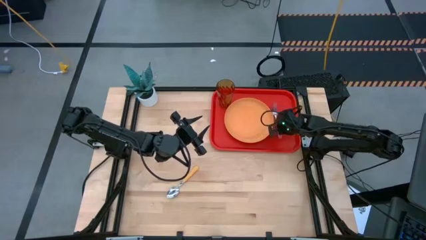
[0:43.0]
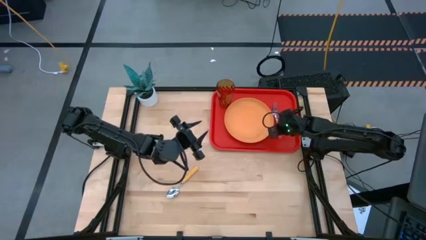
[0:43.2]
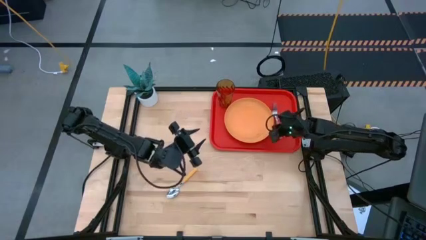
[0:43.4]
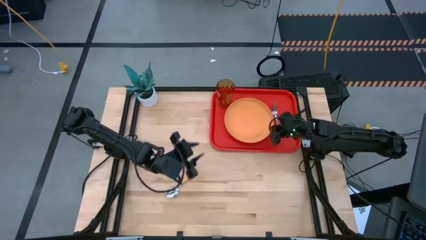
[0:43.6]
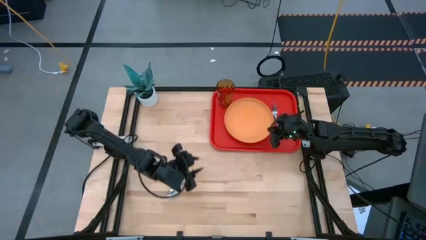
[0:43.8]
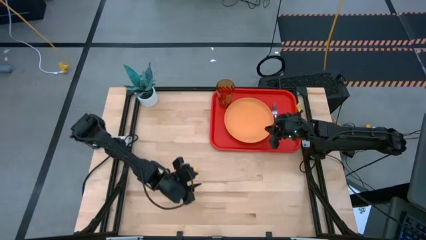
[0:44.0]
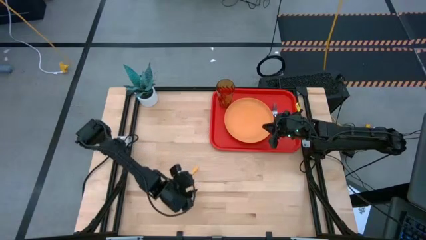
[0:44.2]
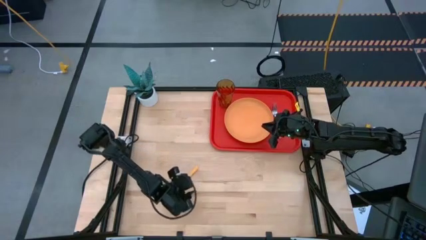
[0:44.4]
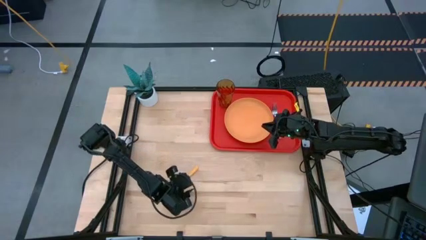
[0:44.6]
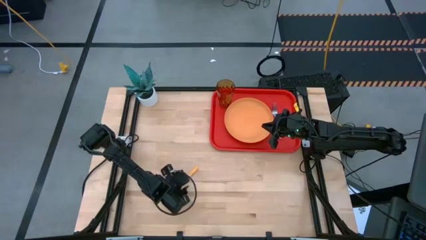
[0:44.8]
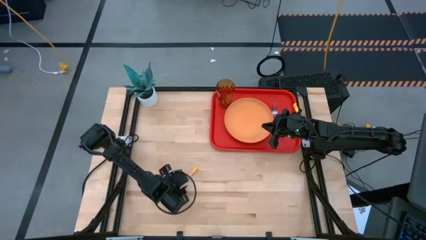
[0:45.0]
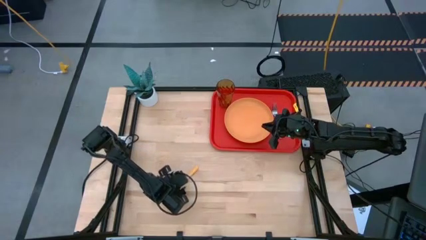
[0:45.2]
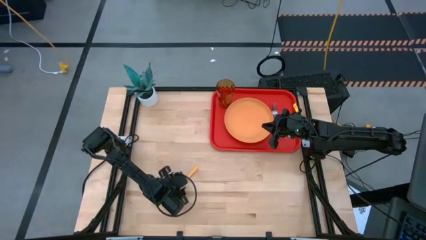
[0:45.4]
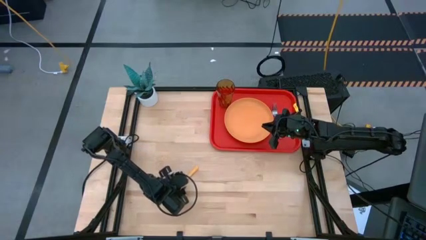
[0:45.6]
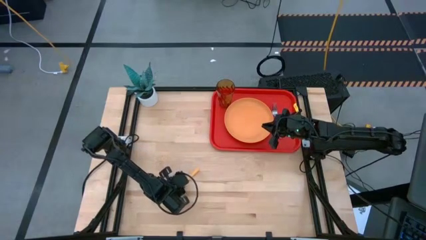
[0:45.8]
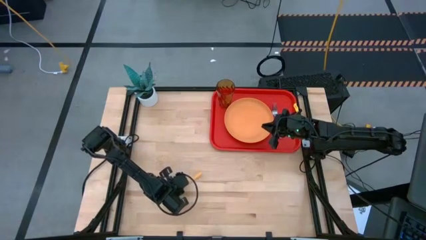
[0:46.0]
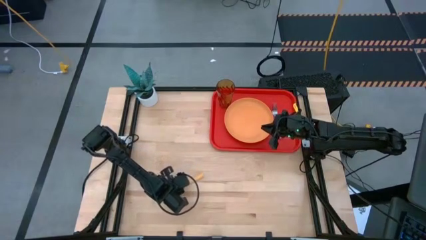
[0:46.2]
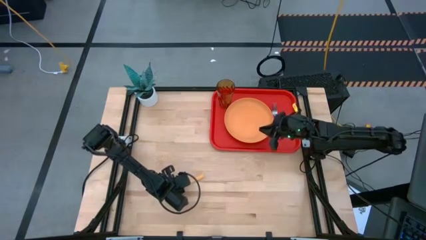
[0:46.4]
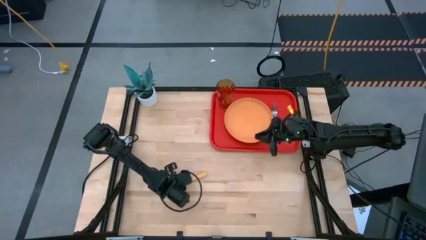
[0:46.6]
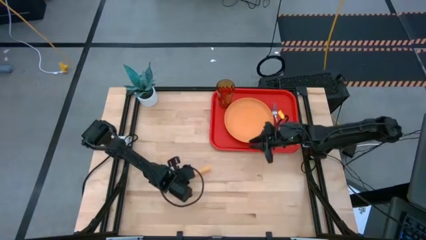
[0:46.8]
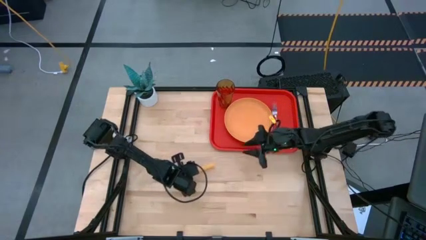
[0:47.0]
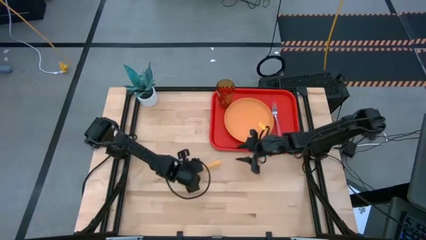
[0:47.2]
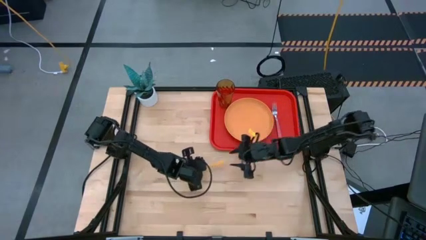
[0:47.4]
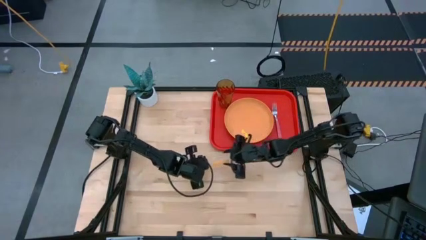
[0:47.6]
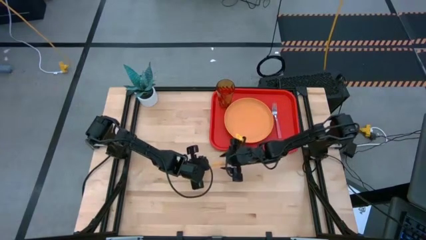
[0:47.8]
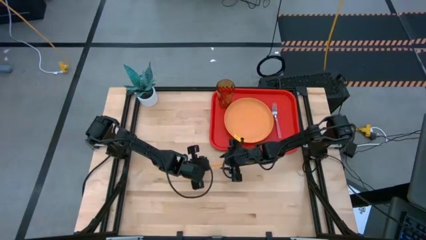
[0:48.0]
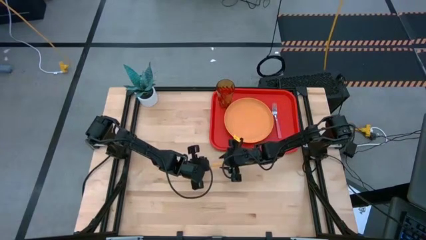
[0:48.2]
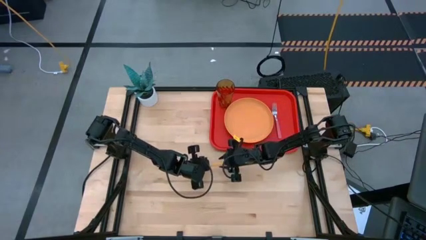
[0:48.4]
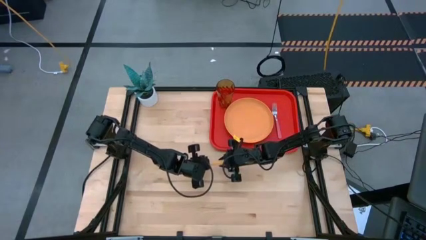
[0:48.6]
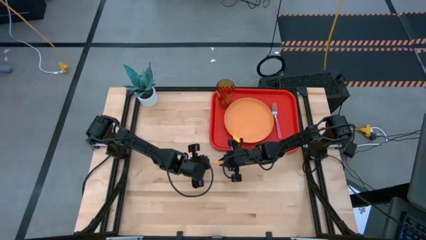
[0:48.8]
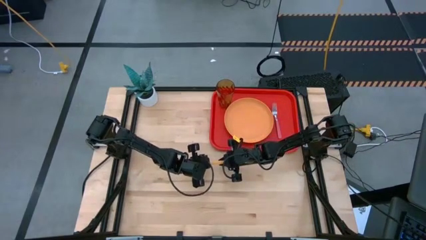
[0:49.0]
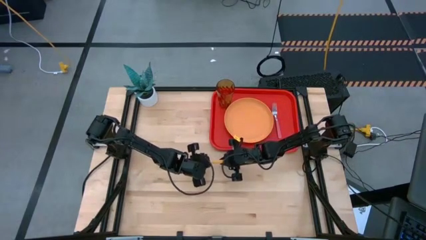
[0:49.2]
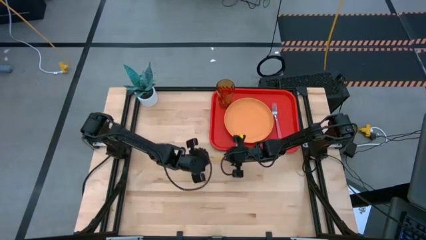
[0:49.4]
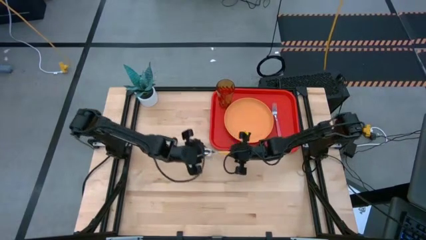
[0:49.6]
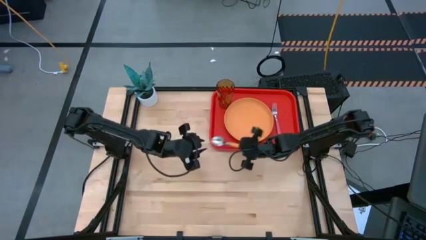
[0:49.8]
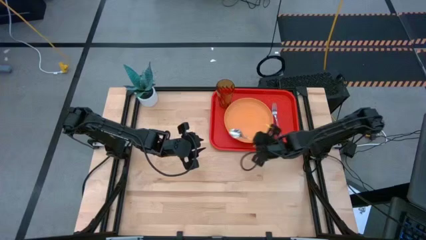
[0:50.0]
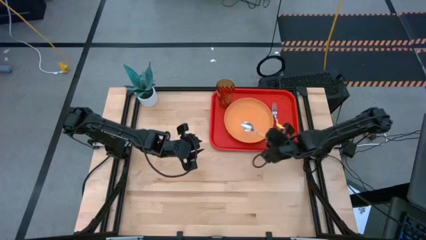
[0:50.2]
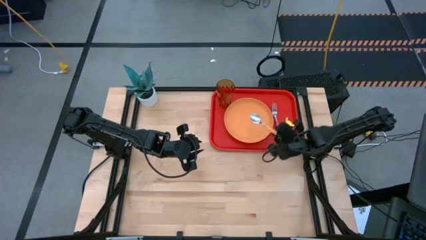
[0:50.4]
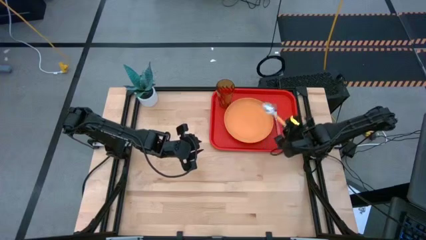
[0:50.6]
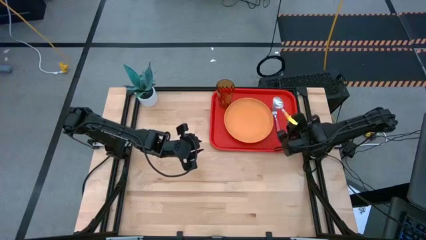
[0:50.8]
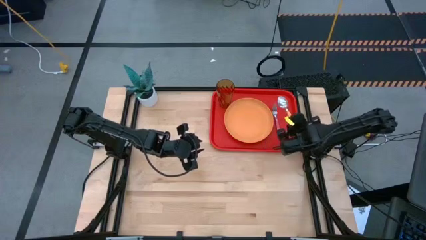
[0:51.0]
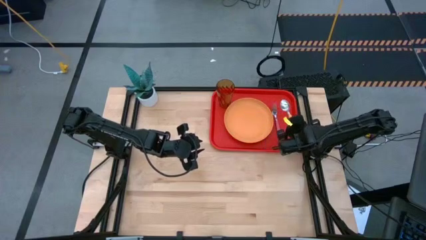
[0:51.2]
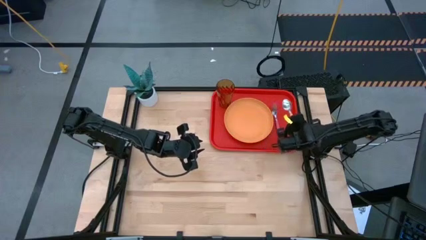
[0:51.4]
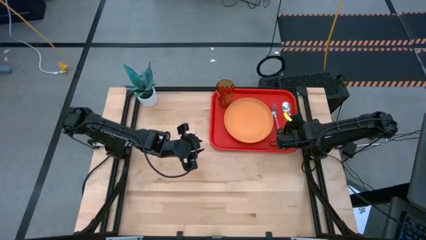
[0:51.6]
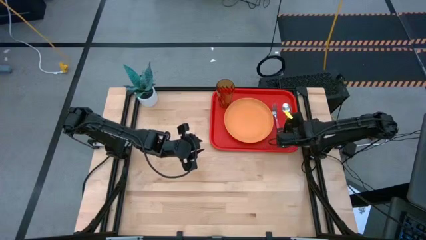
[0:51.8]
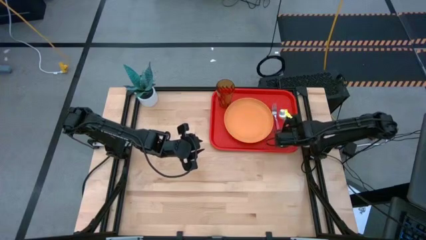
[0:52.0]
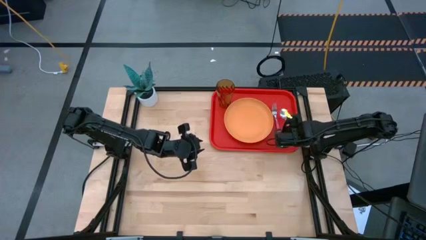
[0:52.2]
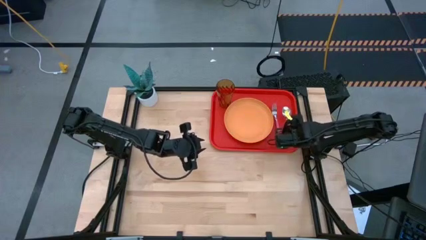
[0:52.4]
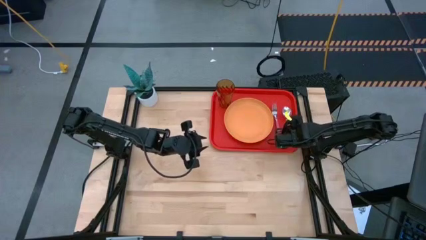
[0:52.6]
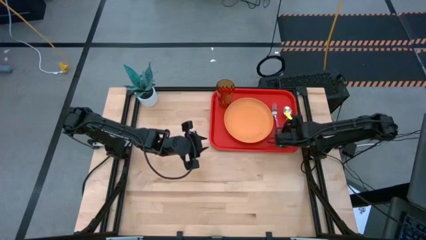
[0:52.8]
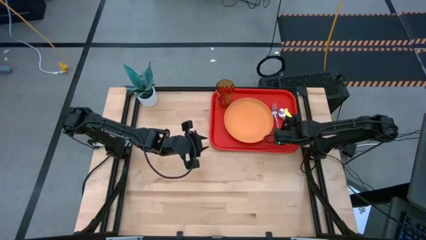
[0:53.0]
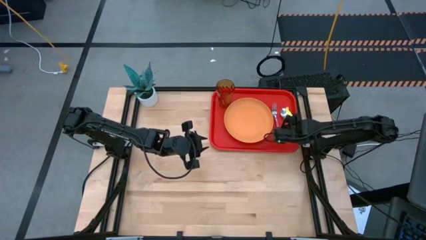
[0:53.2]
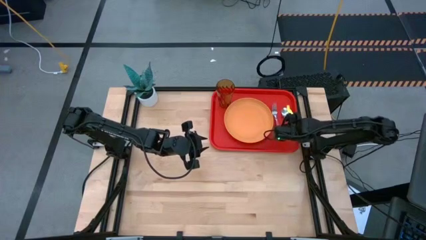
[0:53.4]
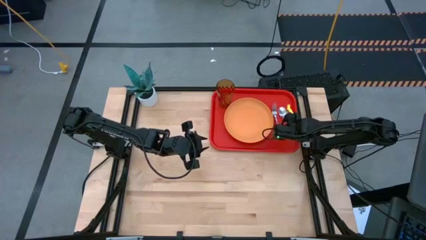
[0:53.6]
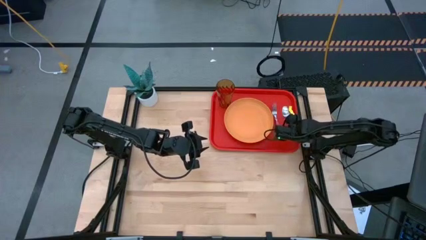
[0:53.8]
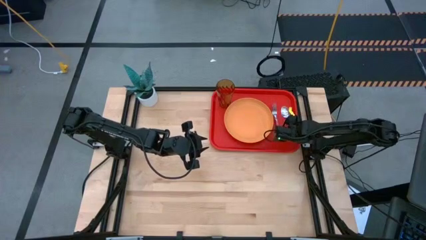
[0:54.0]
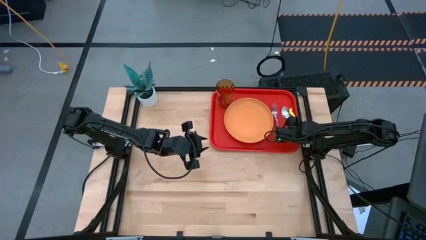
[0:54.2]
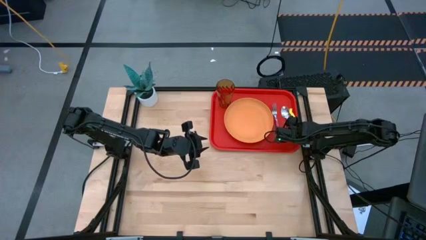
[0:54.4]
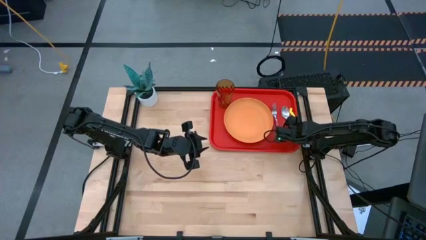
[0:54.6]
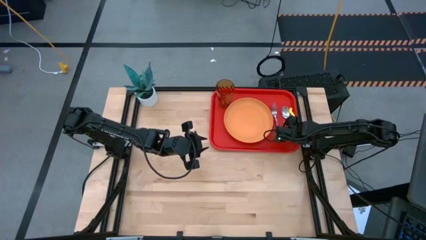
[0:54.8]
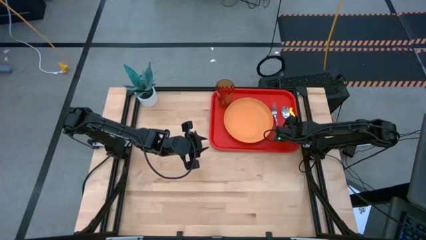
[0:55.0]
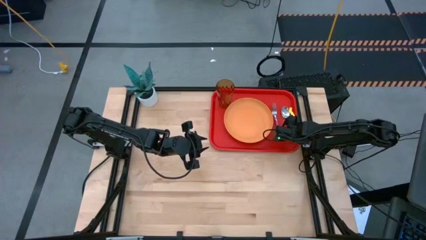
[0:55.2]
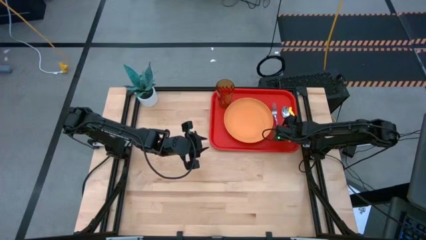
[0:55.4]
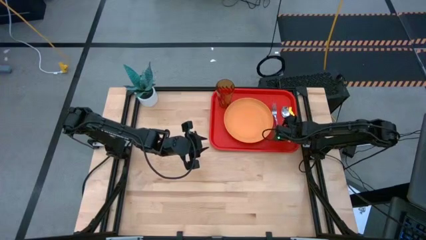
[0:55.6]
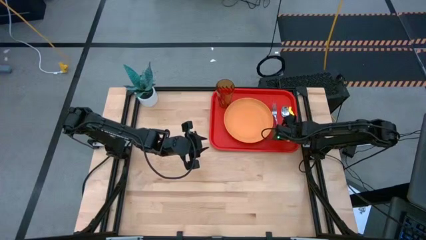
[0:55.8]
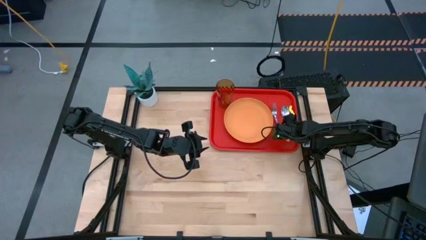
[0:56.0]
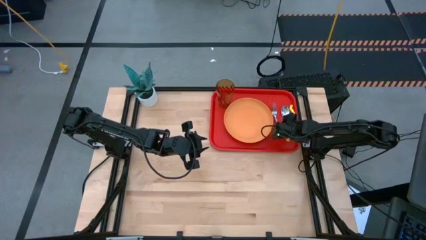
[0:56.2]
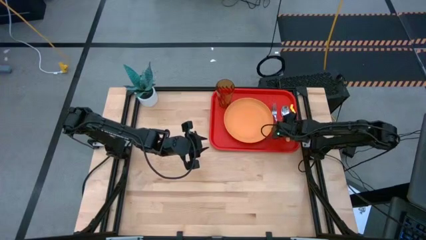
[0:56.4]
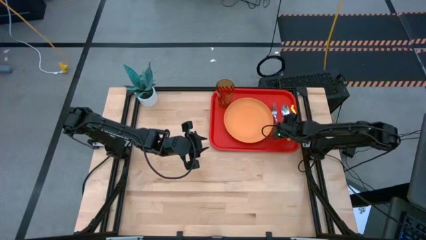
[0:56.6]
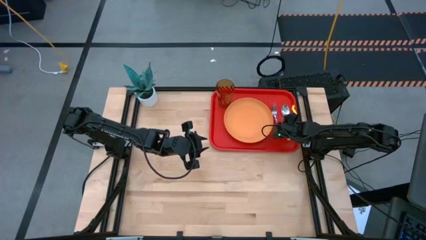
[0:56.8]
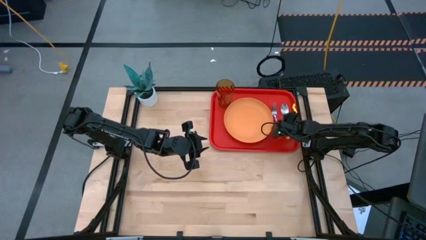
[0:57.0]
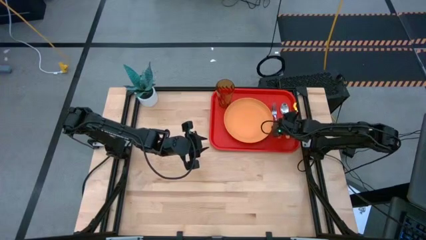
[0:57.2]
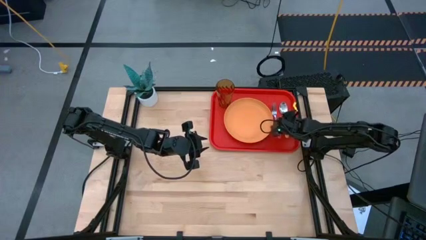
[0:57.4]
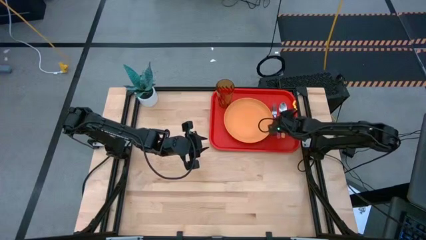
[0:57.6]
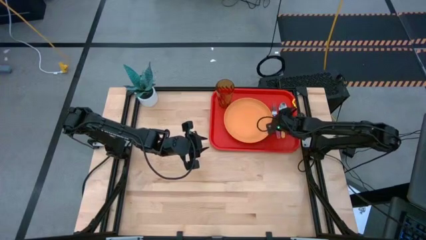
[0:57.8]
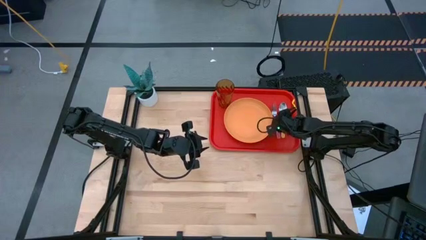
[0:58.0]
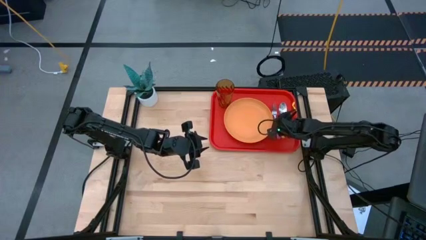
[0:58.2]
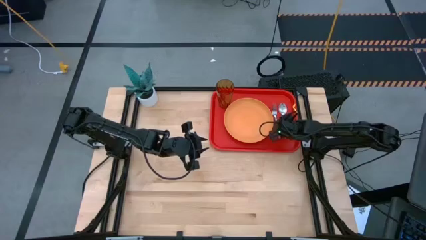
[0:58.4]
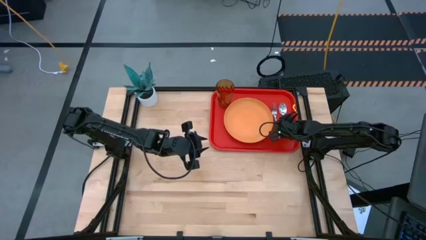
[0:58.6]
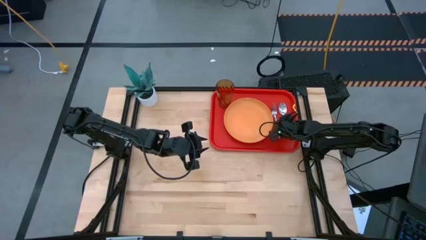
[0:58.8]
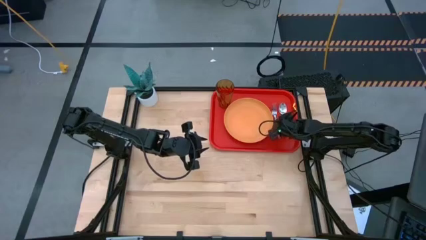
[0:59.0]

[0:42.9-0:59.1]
Task: Pick and place plate/cup/fork/spoon on tray
Put the yellow spoon on the red serving tray to the right of the pink fork
